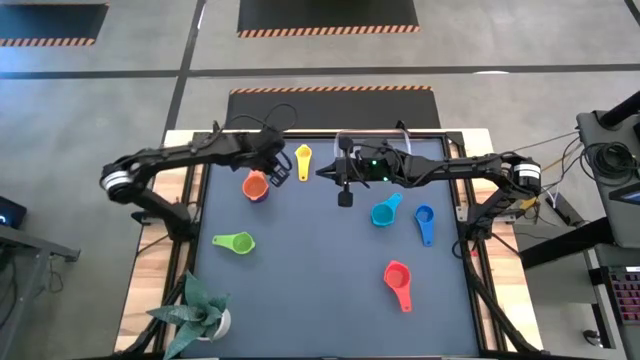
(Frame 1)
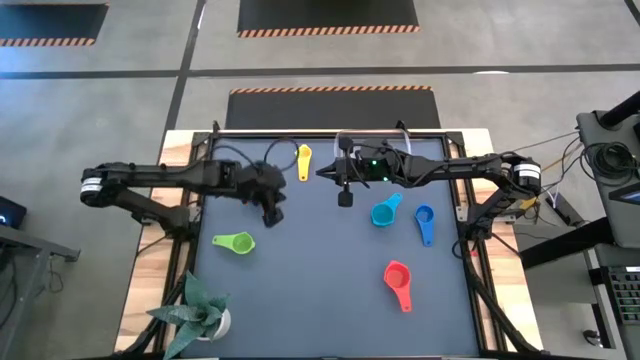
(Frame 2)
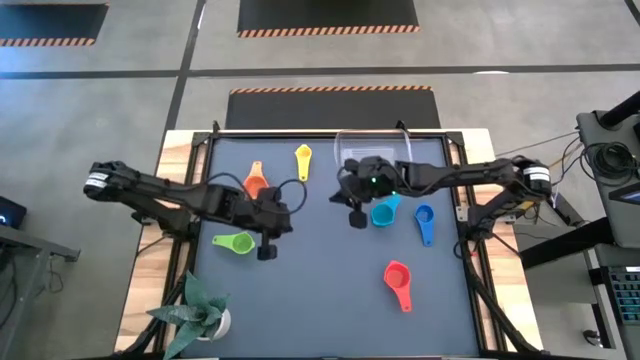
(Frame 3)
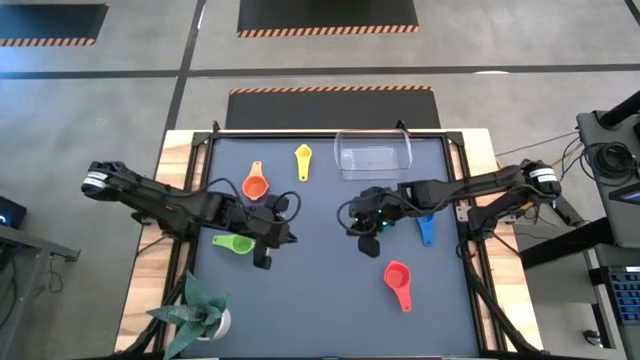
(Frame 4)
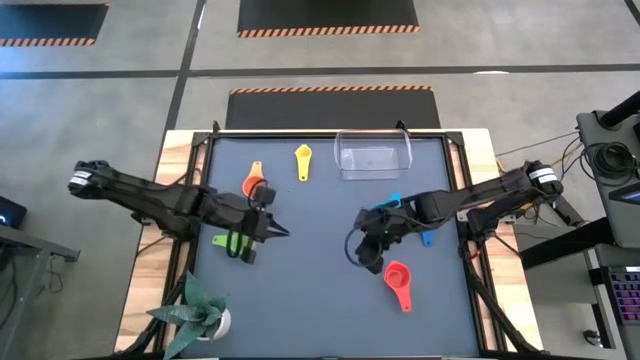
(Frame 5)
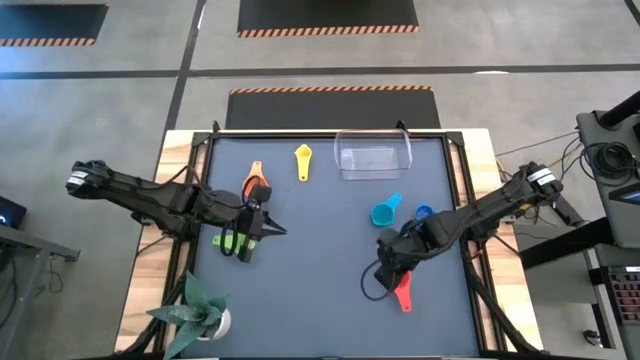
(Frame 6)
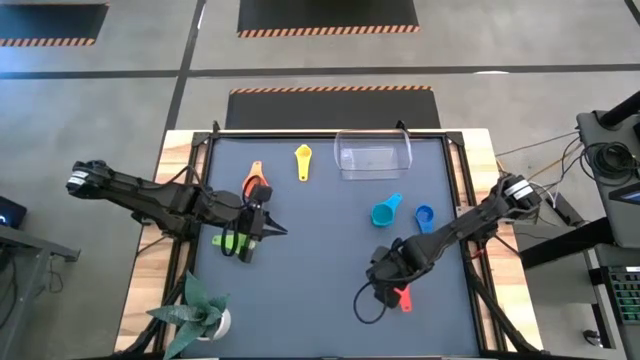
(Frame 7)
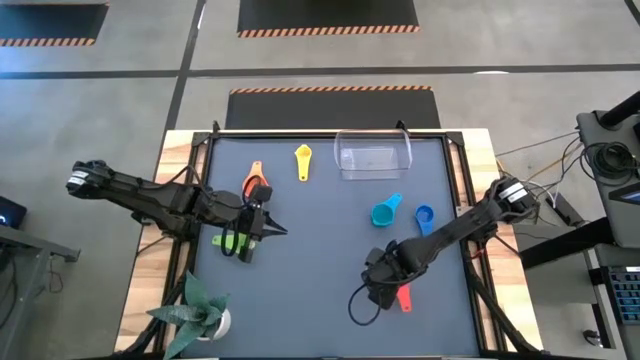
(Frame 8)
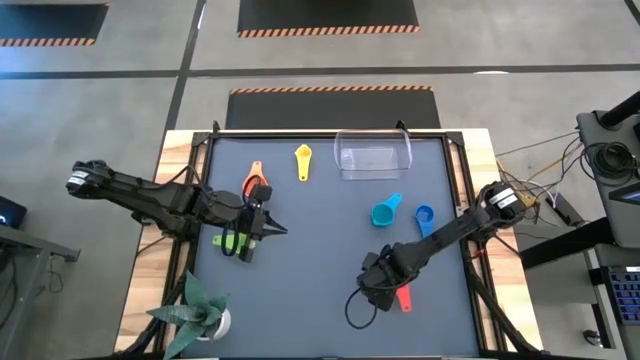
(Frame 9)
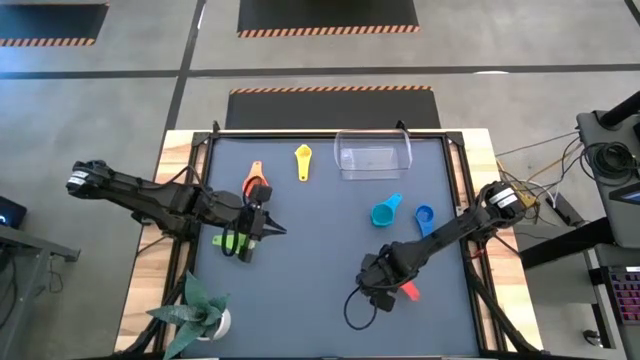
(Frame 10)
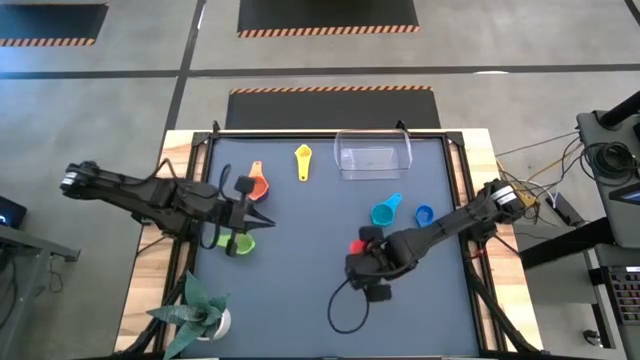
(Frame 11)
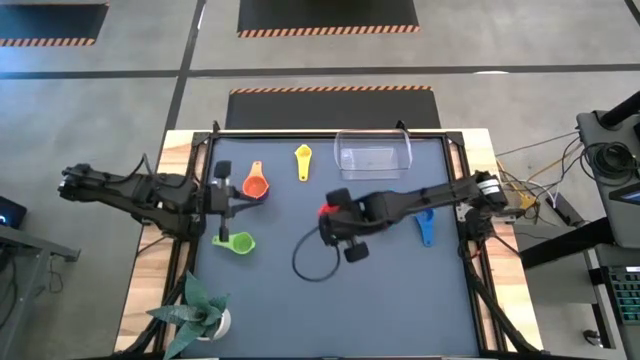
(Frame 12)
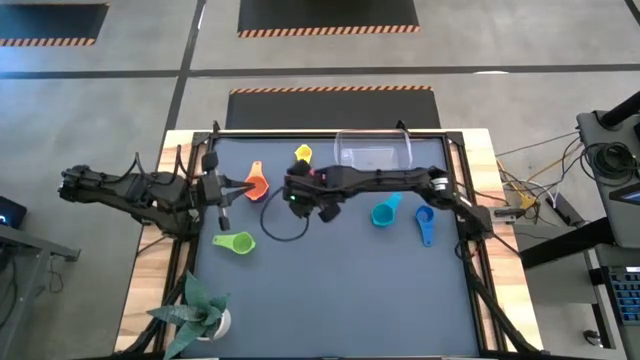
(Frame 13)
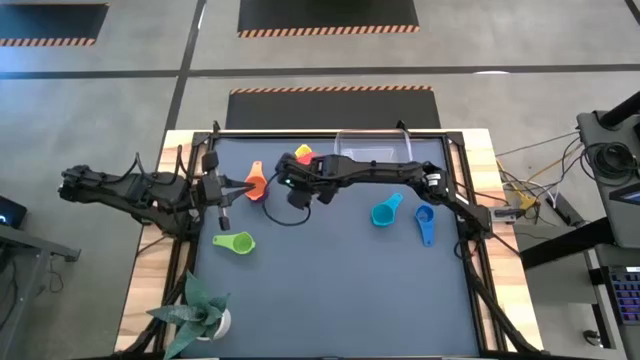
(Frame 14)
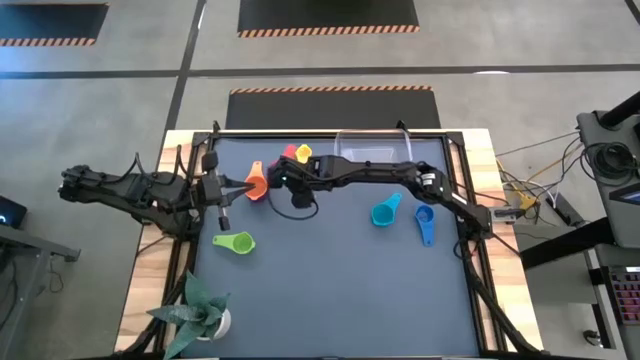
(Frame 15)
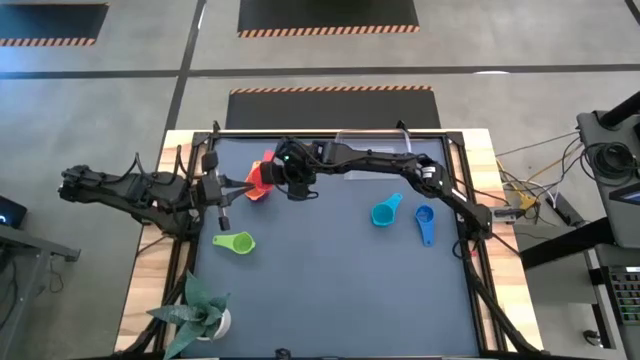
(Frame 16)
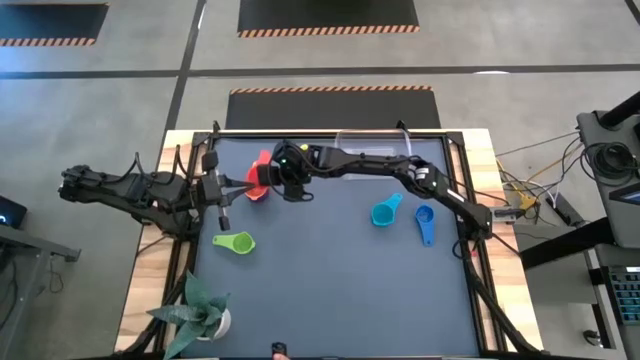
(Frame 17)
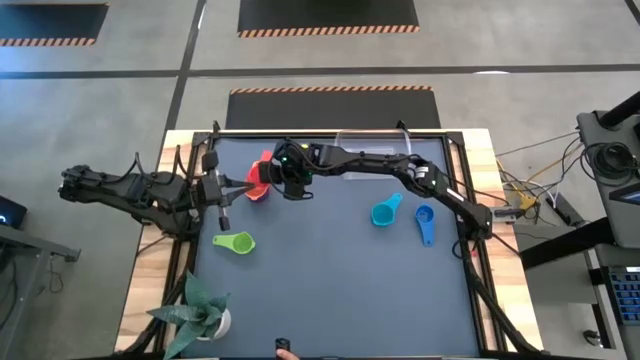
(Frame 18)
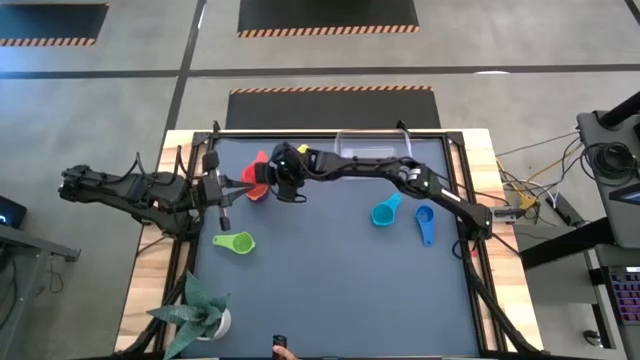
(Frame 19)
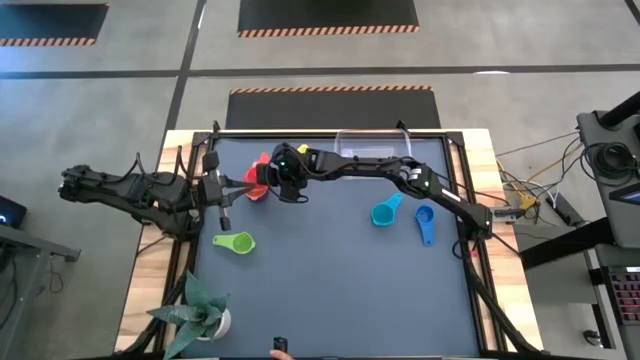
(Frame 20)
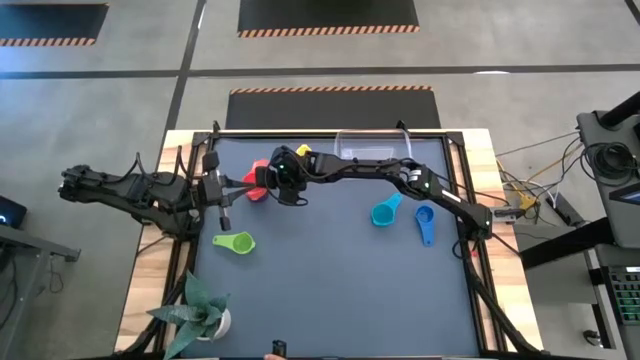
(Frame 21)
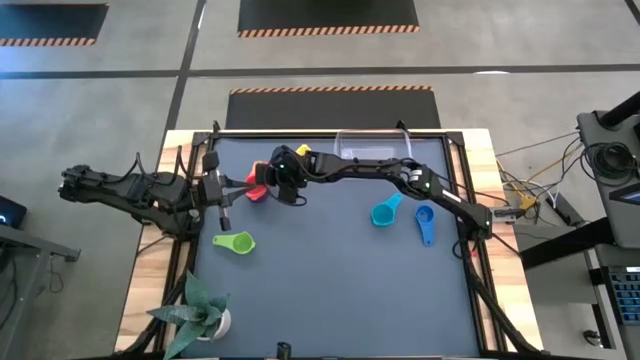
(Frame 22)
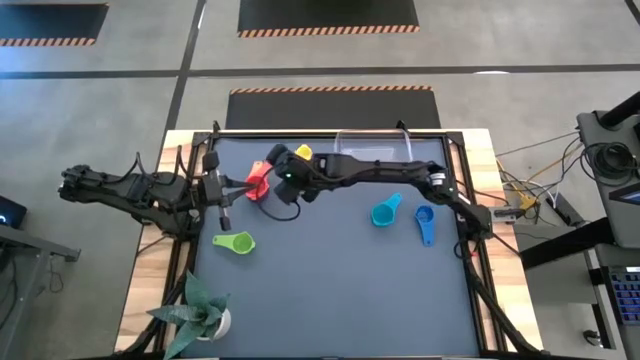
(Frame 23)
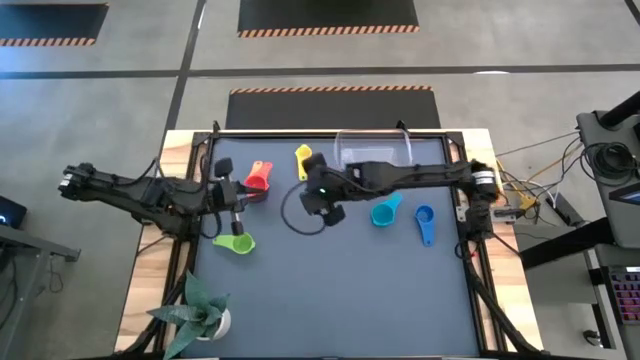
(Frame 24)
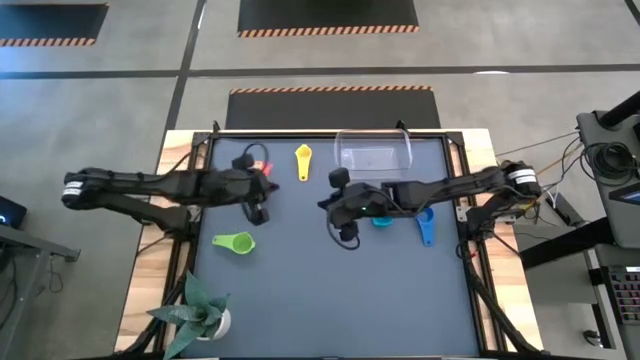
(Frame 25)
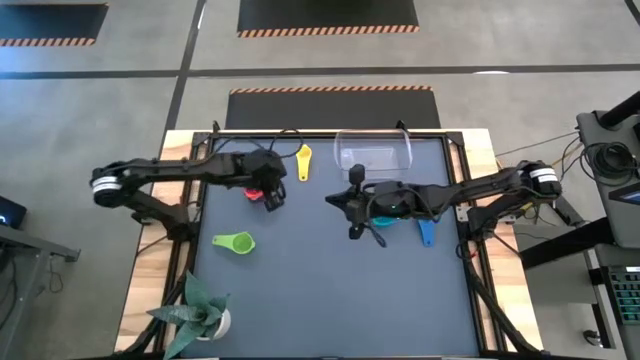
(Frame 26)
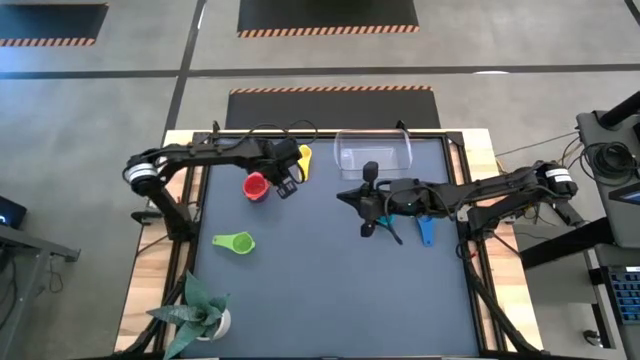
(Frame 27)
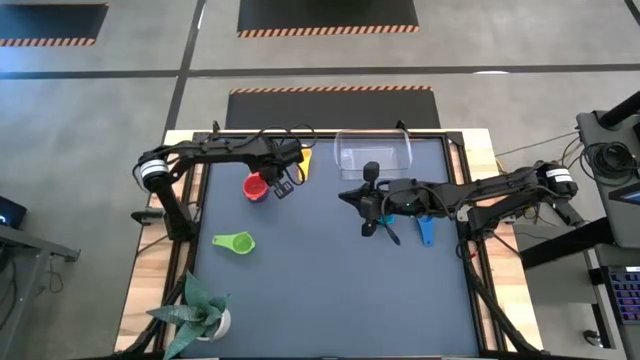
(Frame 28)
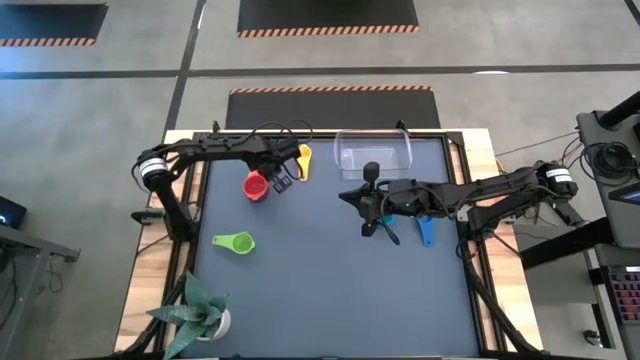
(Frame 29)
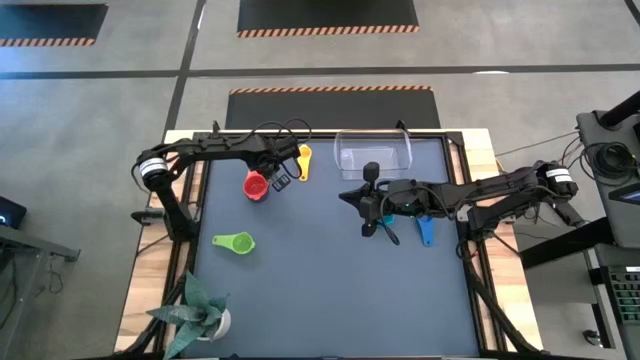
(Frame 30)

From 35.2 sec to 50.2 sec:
Task: Nest measuring cups in basket
Stack the red measuring cup on top of the orange measuring cup
